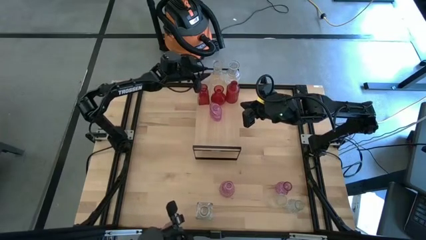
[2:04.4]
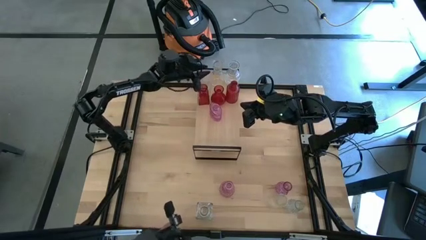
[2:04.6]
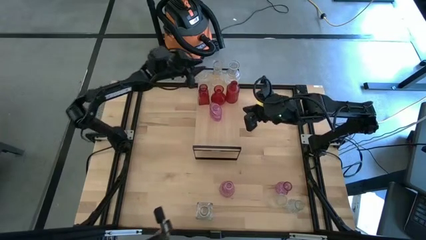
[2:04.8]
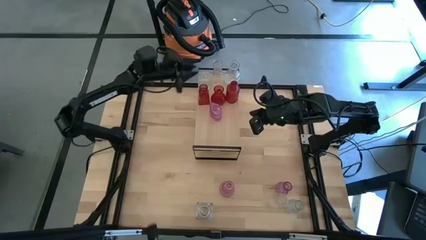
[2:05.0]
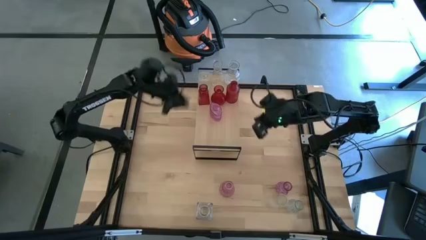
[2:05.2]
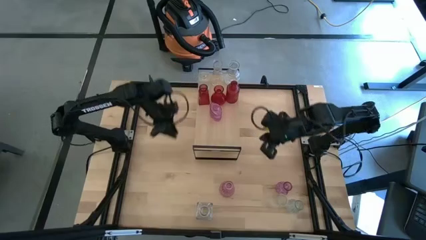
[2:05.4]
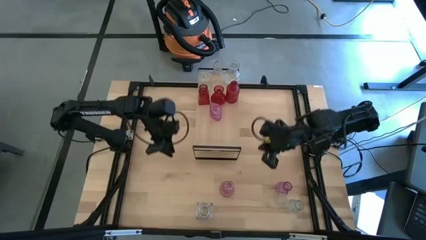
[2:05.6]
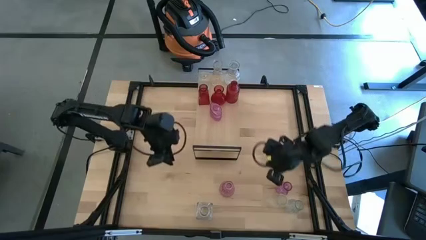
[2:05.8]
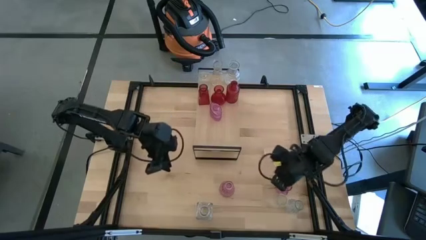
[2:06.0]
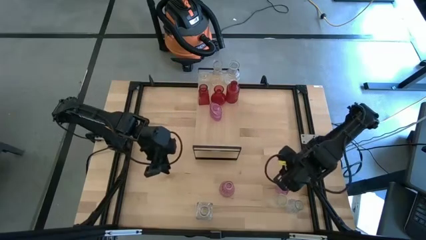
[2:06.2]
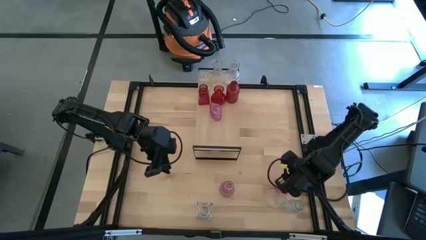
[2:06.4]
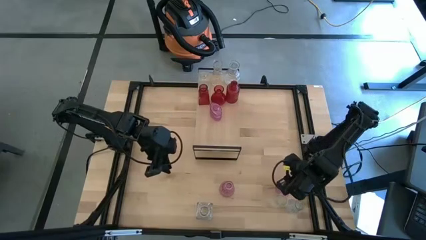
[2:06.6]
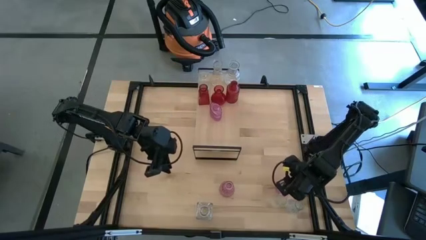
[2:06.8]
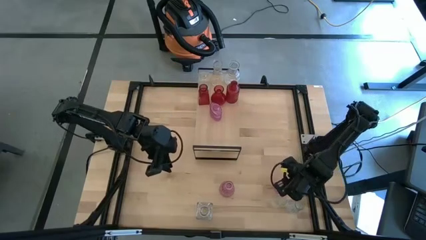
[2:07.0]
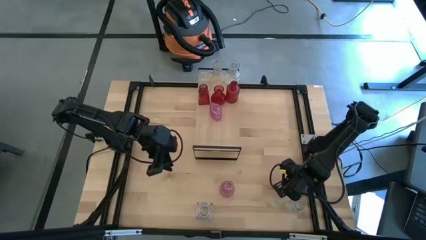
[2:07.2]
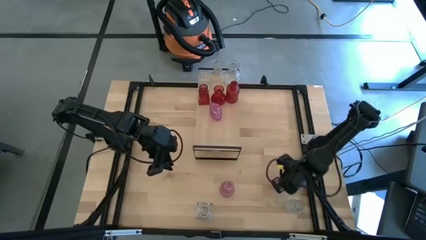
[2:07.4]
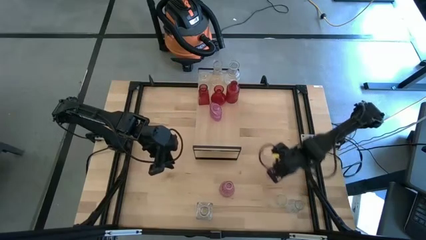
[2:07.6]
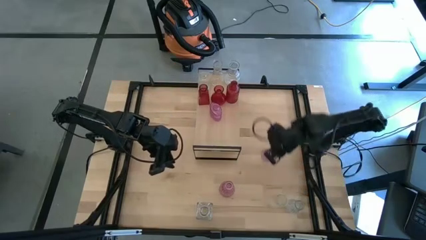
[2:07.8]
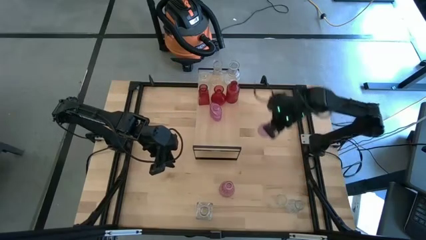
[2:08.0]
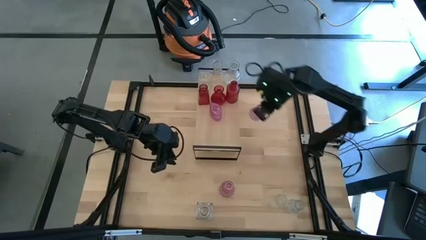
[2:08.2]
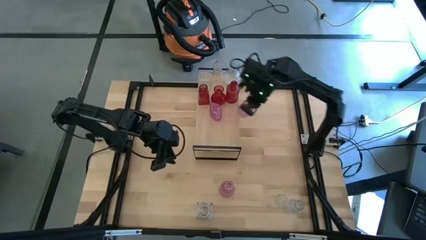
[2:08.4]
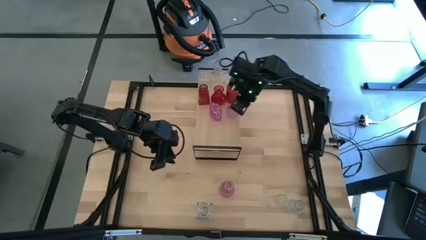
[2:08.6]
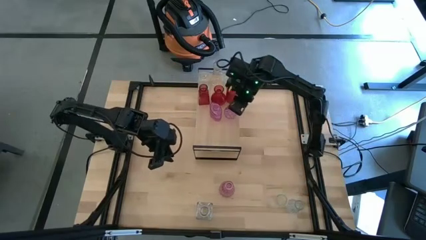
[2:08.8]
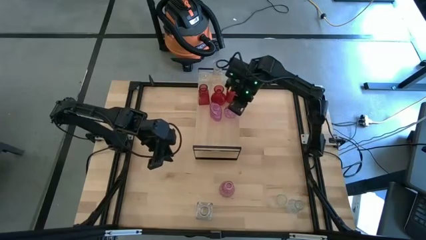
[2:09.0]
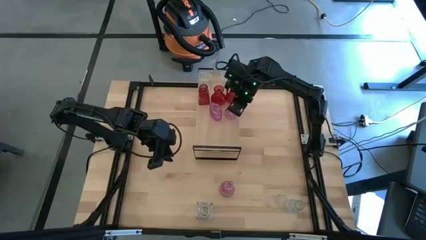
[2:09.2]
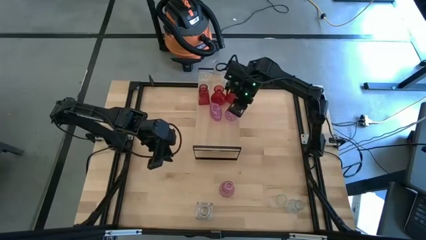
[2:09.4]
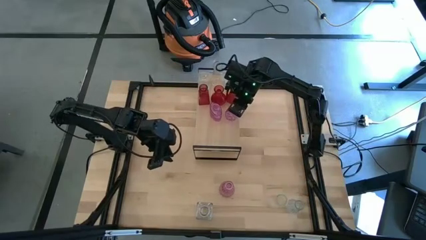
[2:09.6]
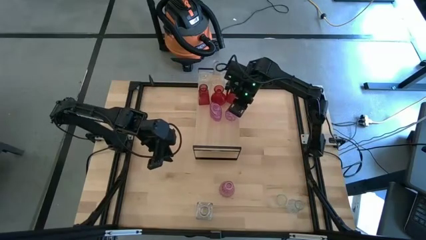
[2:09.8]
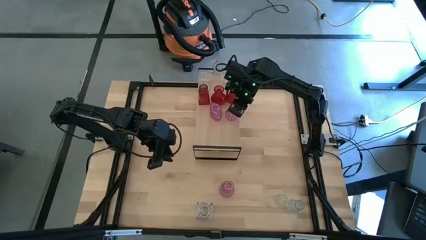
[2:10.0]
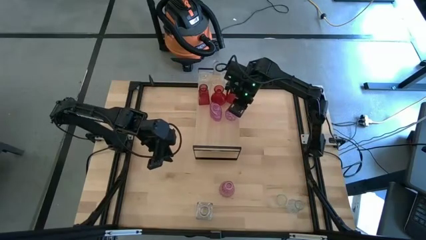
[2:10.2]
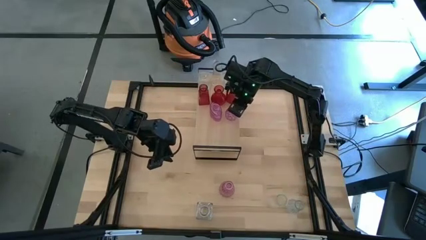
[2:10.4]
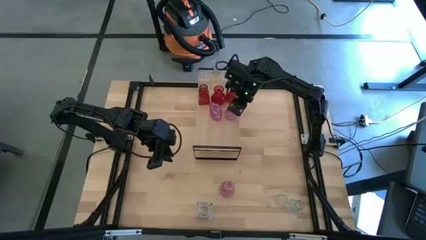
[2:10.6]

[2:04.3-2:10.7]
Task: sort vases onto shelf
Put the purple vase on the shelf aligned with the other purple vase

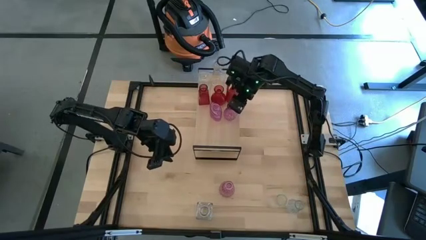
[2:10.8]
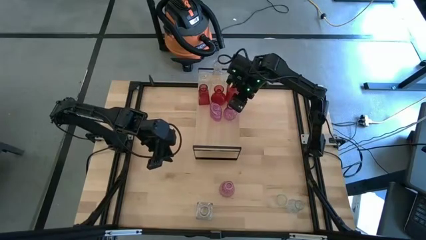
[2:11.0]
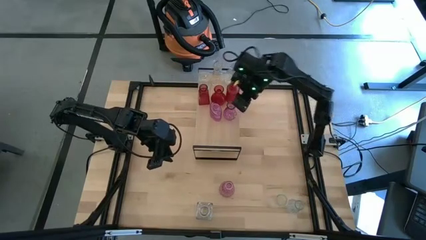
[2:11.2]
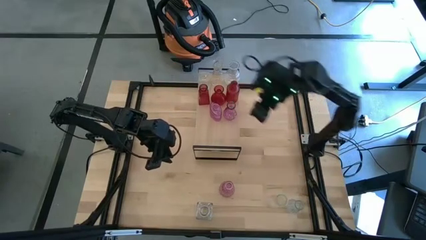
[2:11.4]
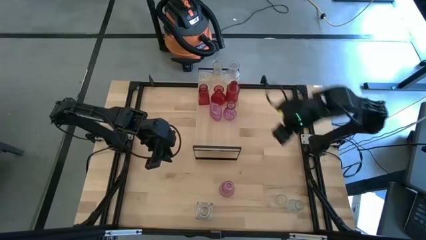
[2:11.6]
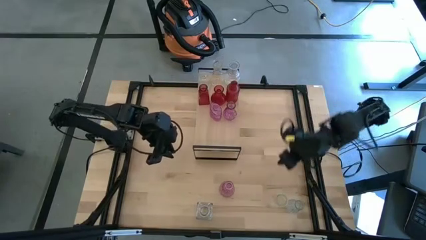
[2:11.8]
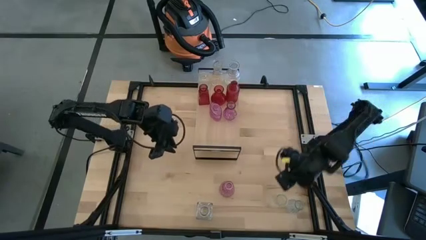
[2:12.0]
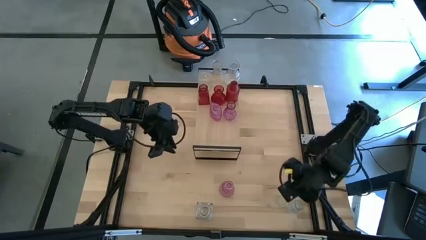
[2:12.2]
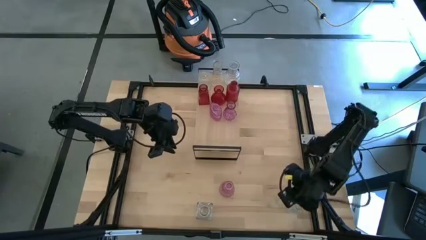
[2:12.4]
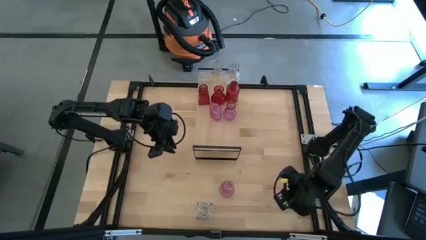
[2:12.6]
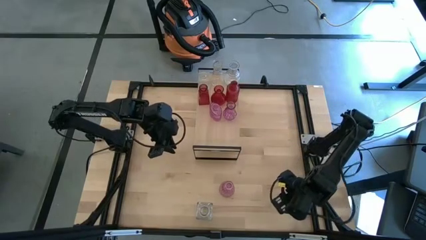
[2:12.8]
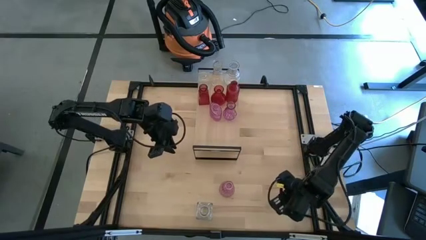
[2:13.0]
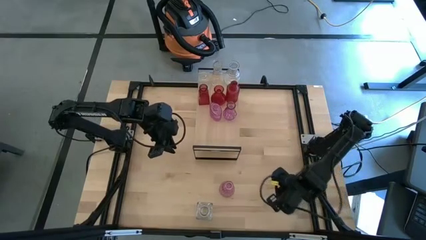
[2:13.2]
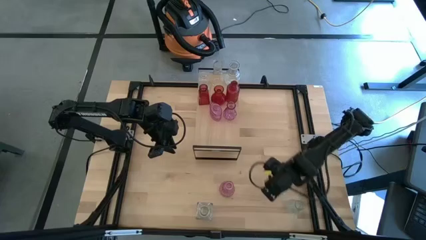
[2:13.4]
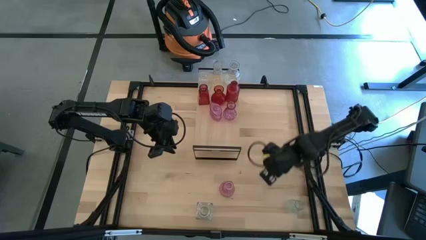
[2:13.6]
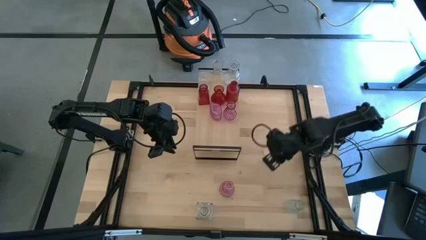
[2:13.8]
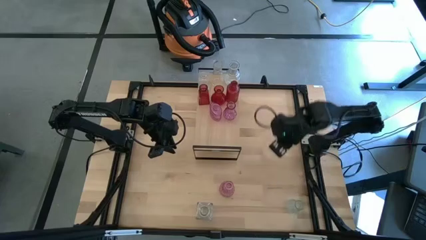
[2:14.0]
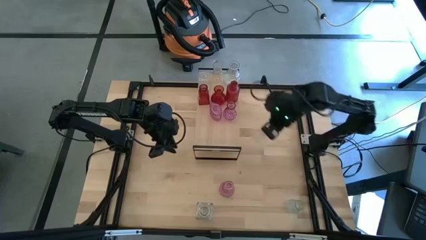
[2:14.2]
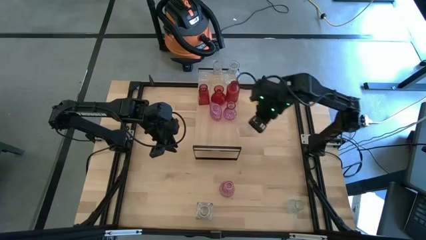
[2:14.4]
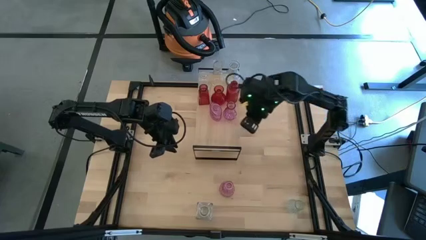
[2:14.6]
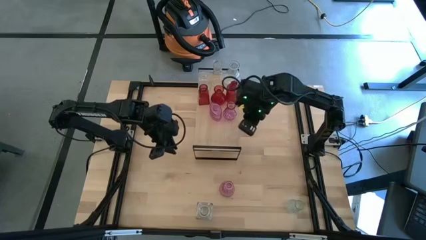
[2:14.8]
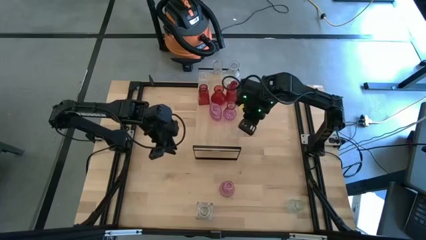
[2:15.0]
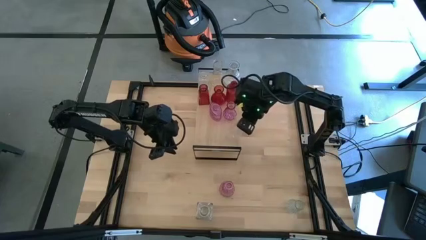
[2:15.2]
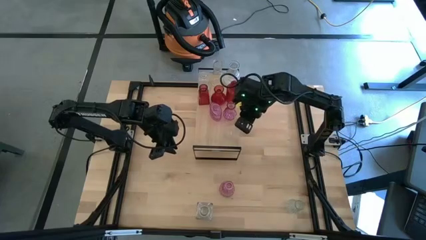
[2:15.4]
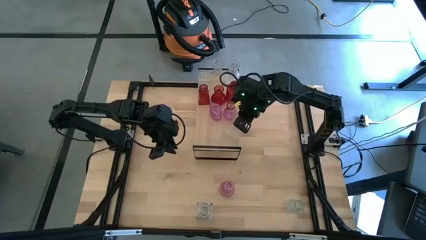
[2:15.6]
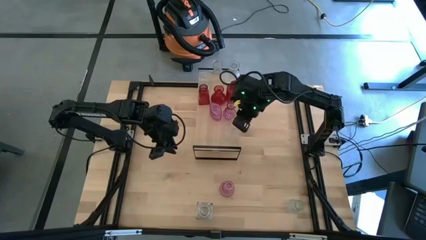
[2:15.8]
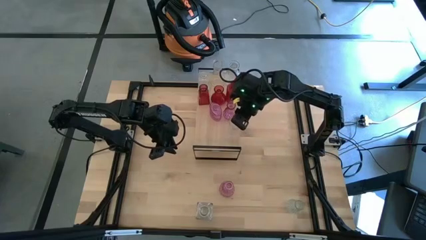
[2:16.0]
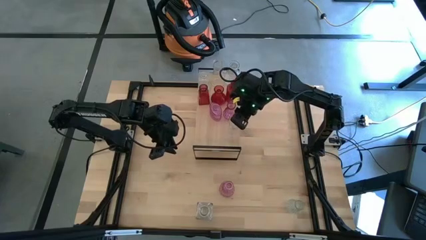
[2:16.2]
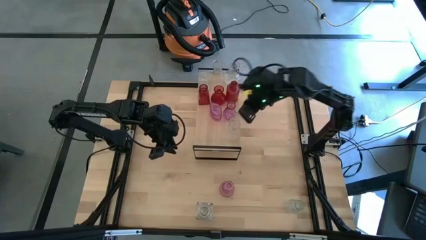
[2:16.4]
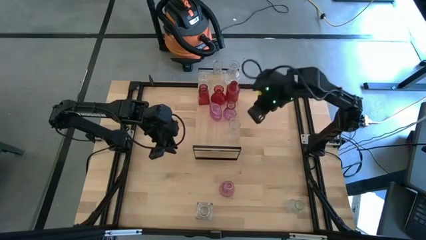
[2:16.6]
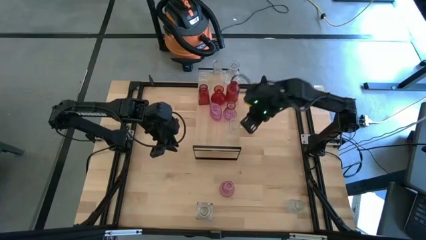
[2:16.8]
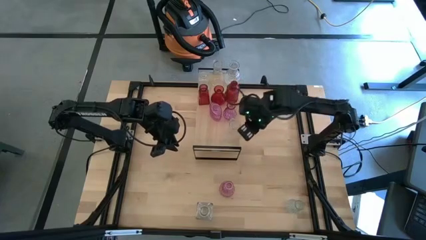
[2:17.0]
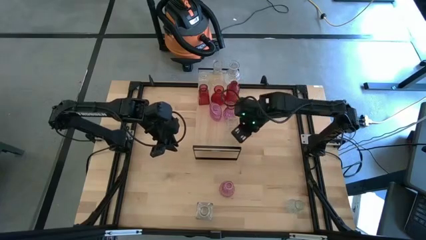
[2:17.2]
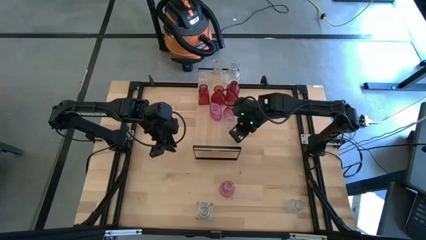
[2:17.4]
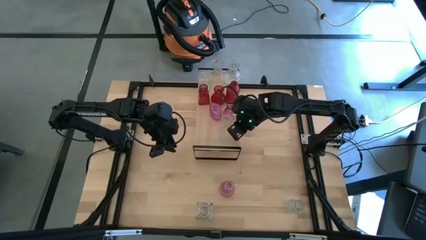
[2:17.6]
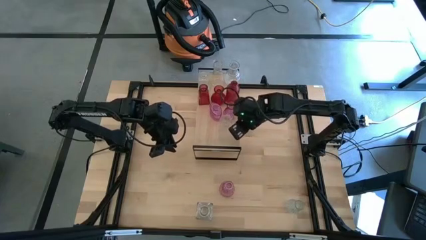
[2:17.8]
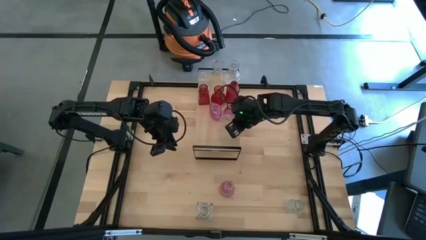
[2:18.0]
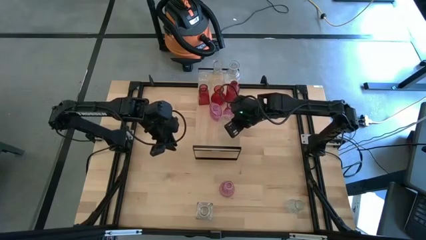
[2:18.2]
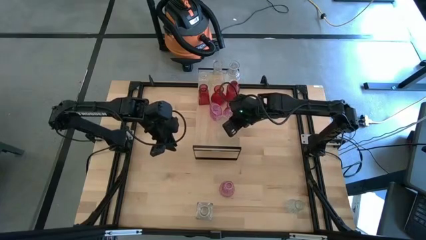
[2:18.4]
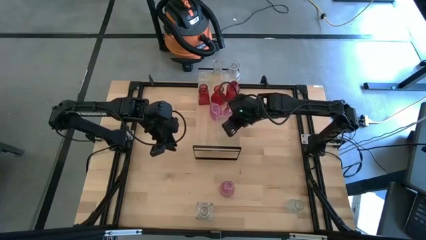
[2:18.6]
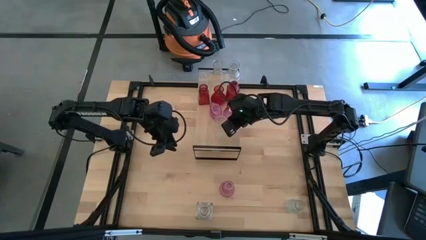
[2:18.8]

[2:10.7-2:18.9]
Put the transparent vase on the shelf

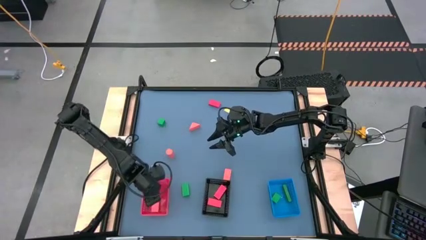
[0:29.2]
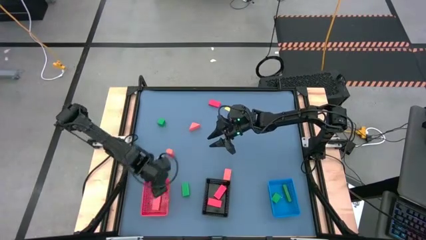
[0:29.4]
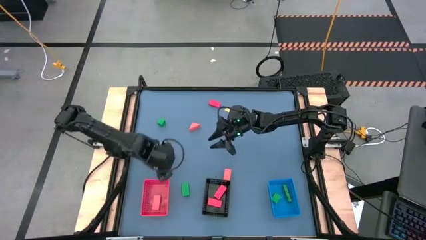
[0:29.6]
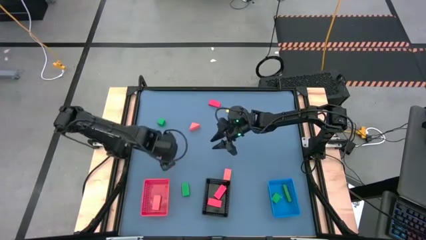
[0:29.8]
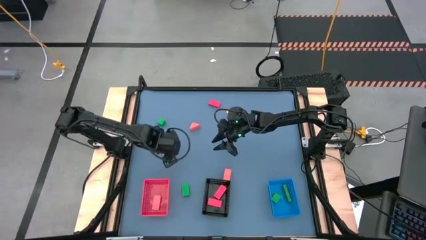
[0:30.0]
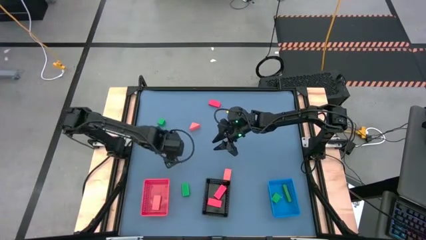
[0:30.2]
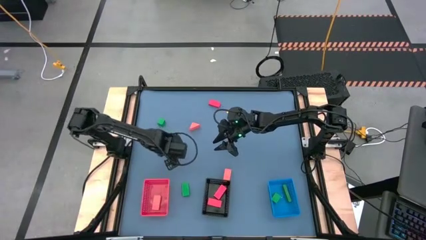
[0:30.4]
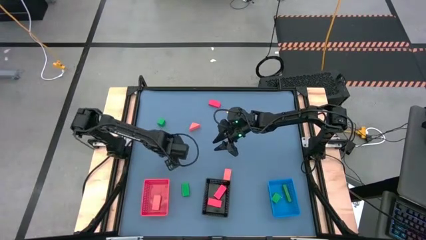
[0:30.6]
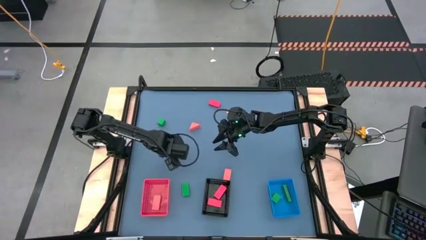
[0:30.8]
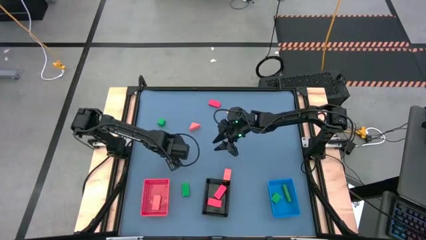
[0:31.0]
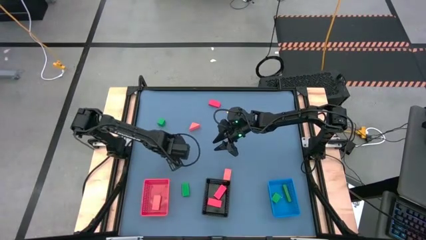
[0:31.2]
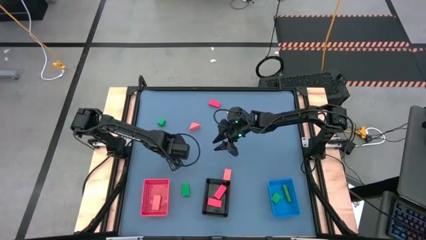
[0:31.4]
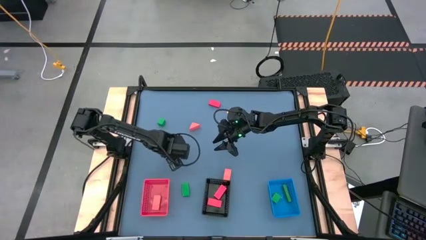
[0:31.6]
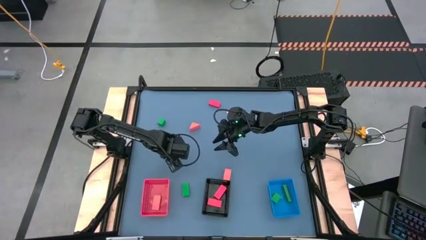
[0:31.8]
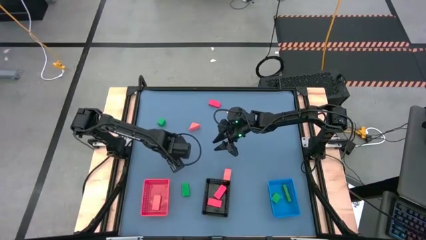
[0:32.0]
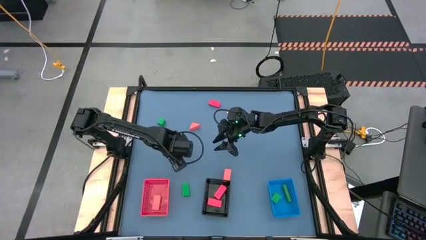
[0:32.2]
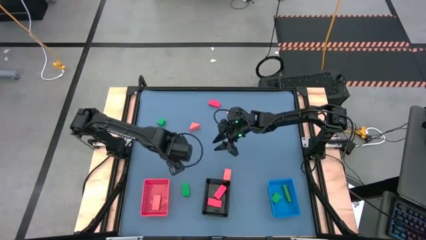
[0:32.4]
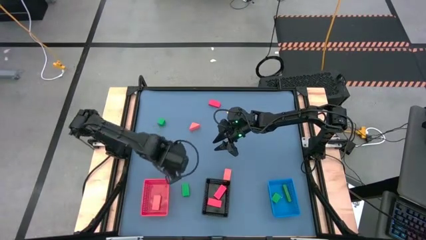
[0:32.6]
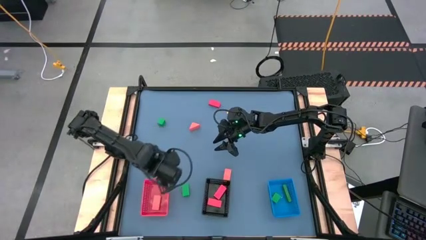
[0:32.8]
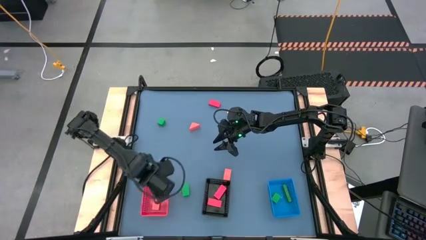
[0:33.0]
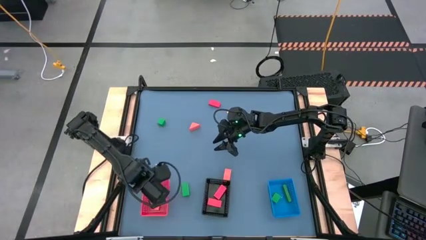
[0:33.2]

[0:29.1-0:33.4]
Task: Sort & place blocks by color
Put the orange block into the red bin
